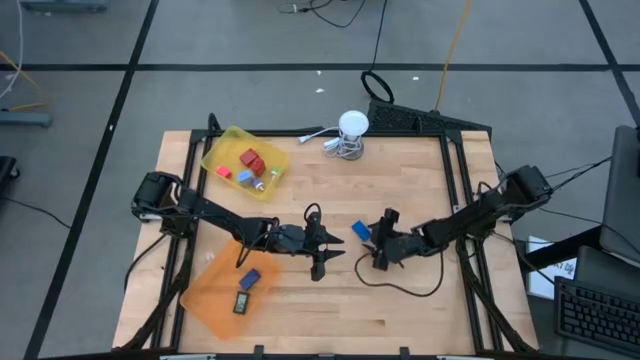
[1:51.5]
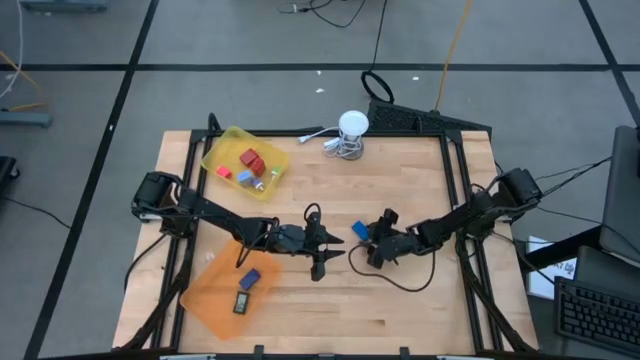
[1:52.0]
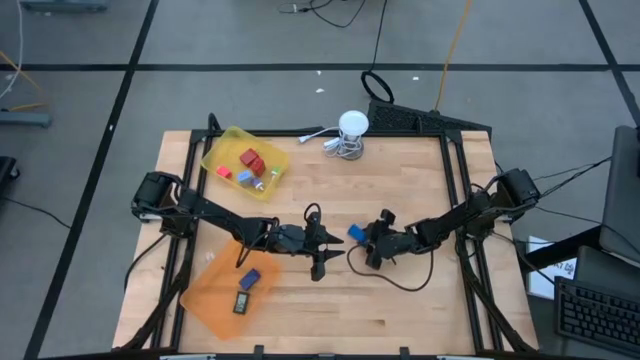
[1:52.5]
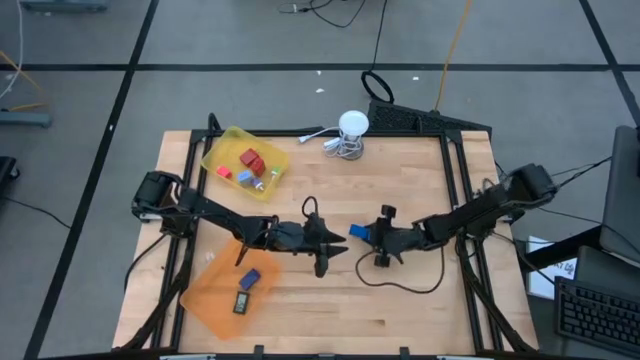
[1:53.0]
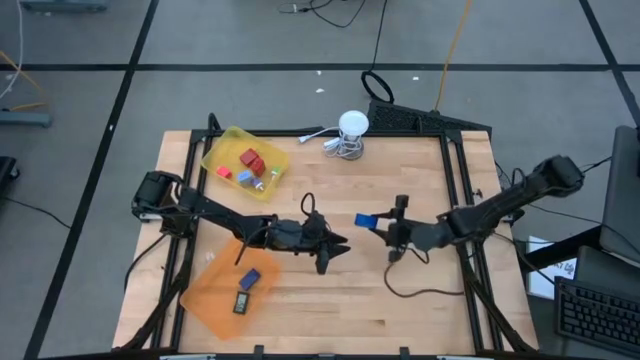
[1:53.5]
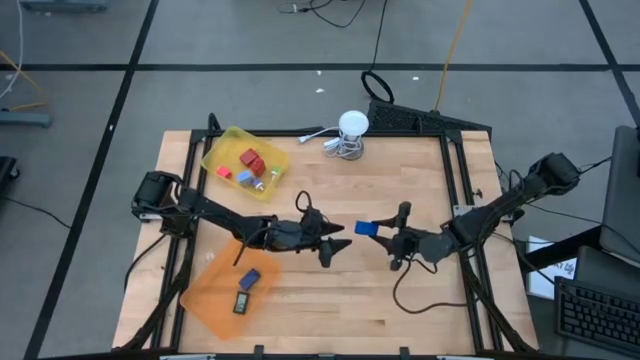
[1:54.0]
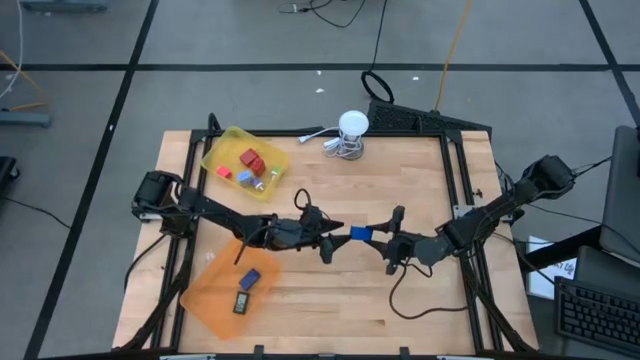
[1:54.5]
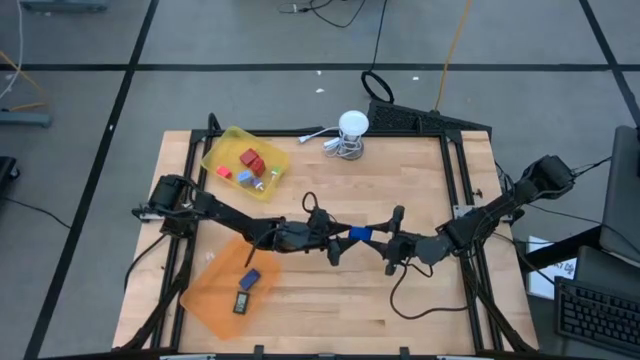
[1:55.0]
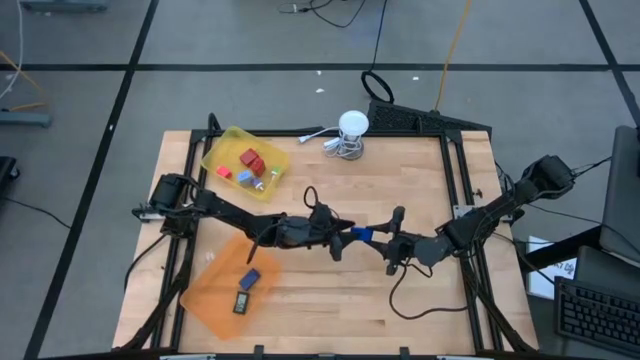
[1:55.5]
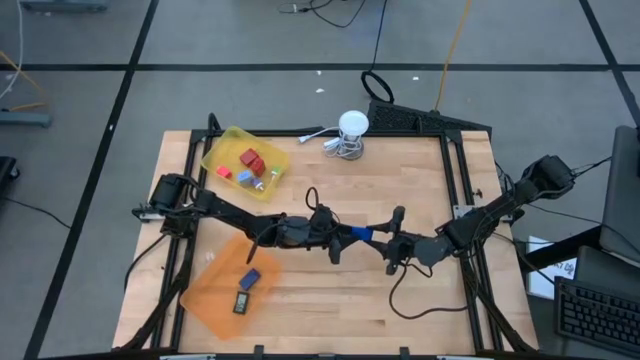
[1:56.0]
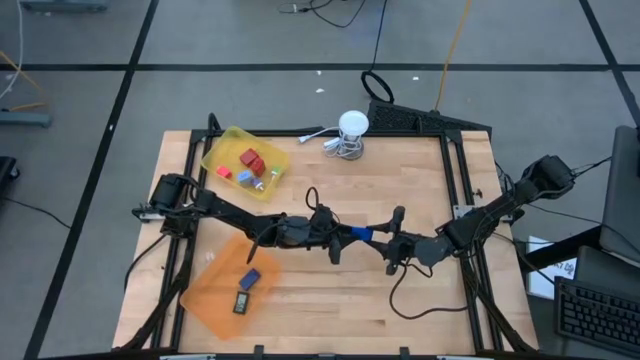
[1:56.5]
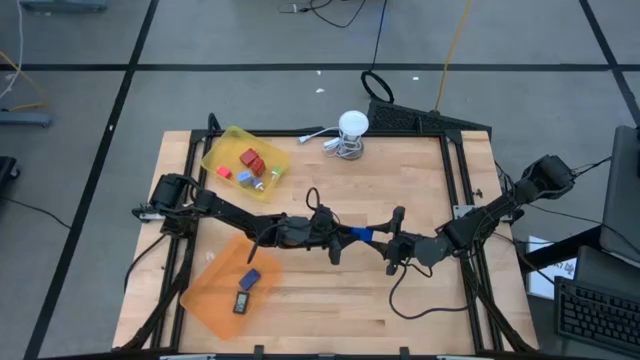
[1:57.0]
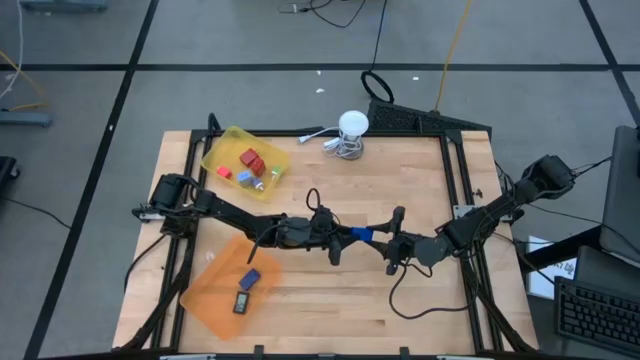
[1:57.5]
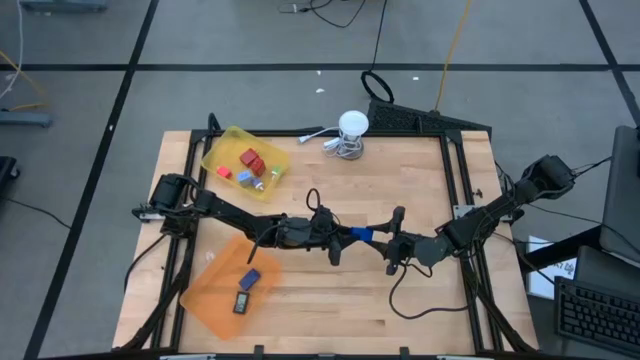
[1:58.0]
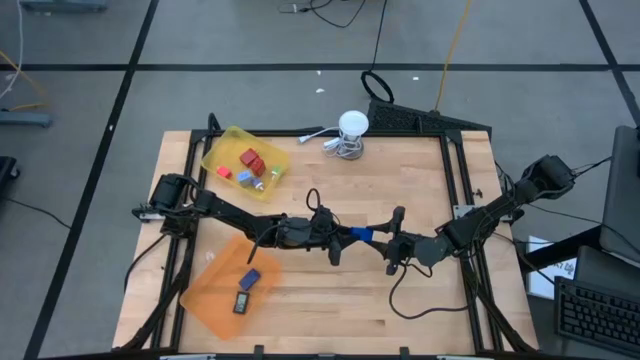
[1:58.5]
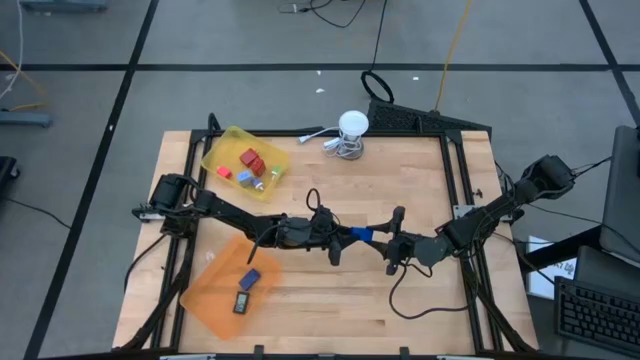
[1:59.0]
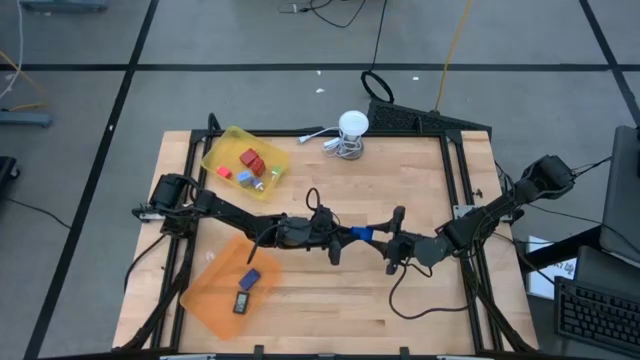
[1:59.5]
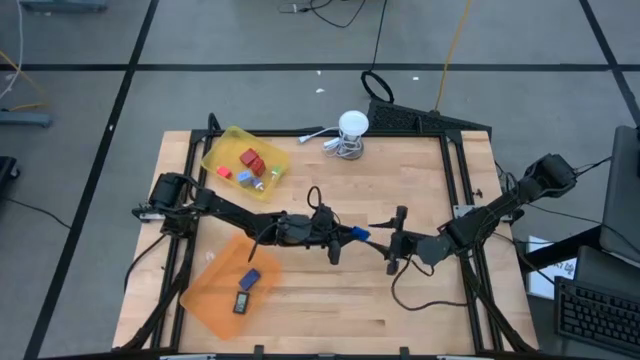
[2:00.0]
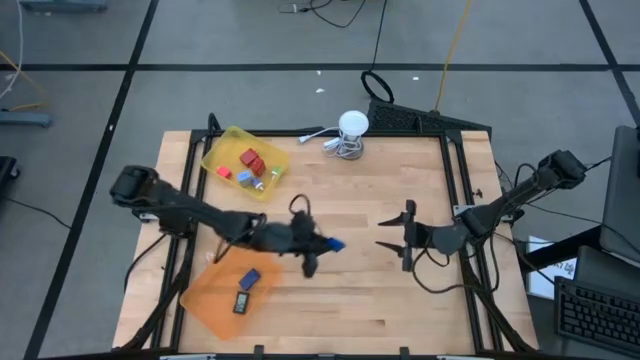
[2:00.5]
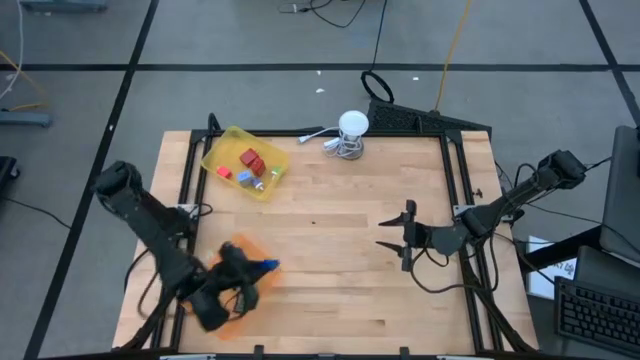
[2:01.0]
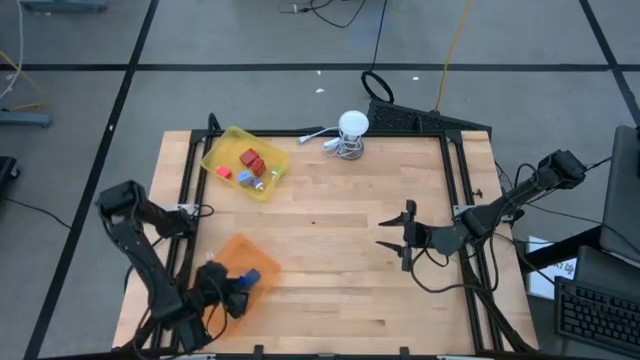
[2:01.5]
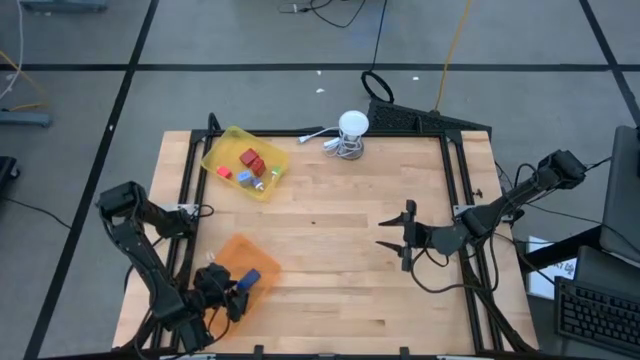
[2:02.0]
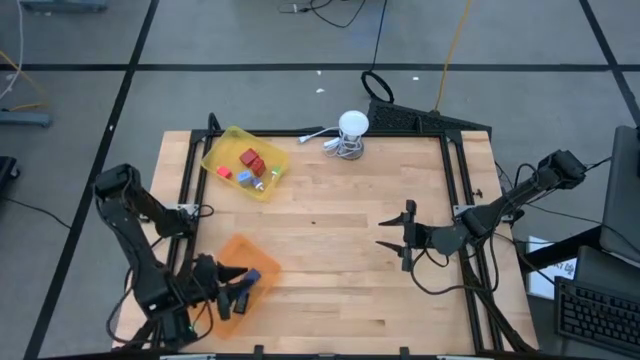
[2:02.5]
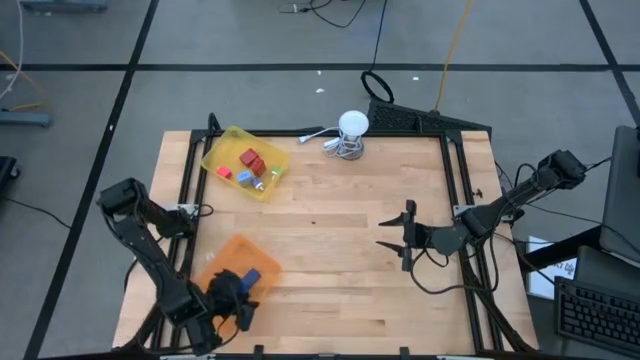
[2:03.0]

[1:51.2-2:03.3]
Task: Pick & Place Office items
Put the blue digital timer into the orange bin

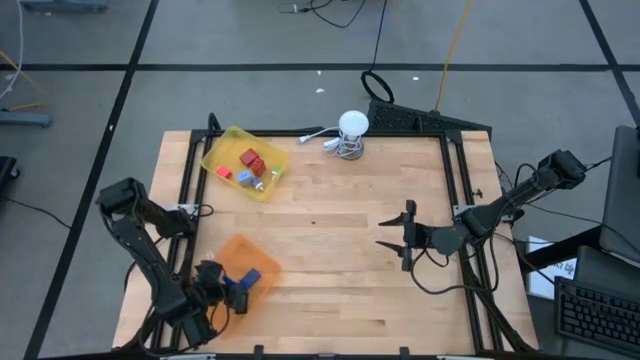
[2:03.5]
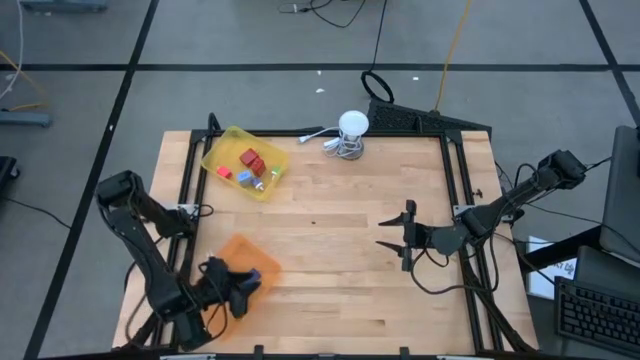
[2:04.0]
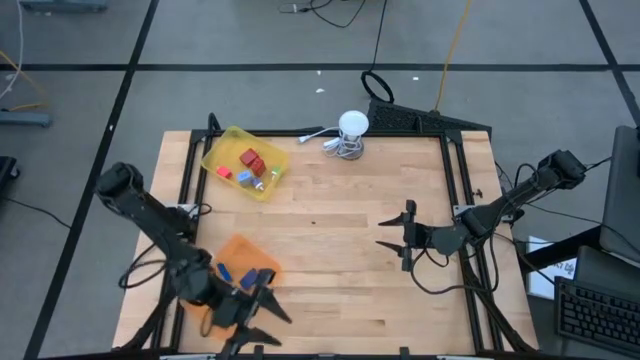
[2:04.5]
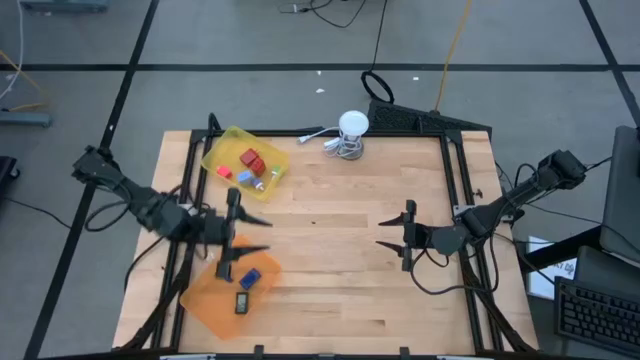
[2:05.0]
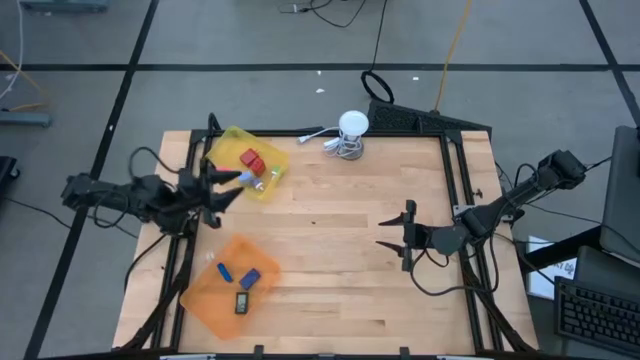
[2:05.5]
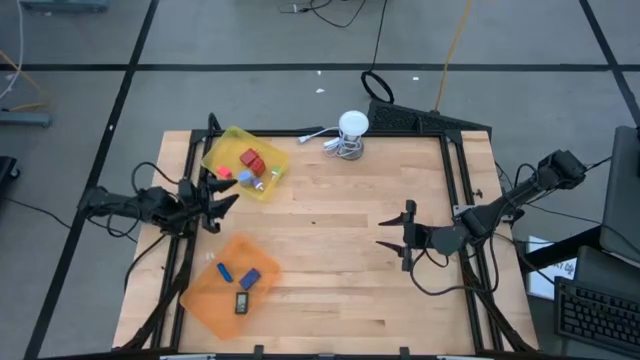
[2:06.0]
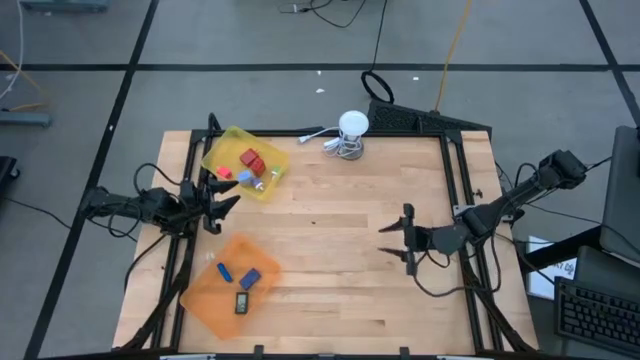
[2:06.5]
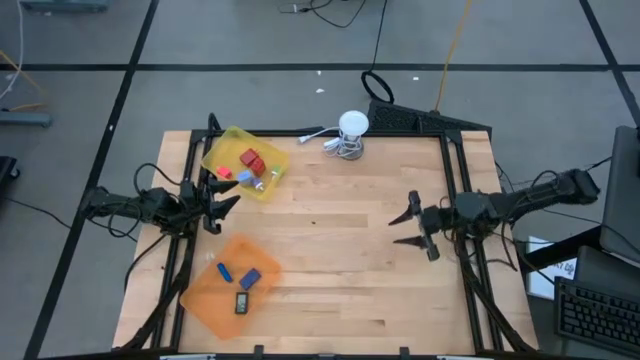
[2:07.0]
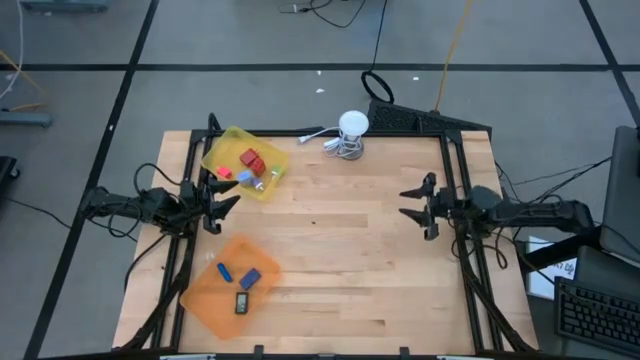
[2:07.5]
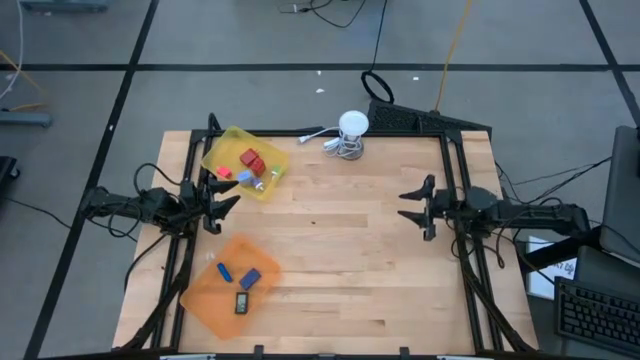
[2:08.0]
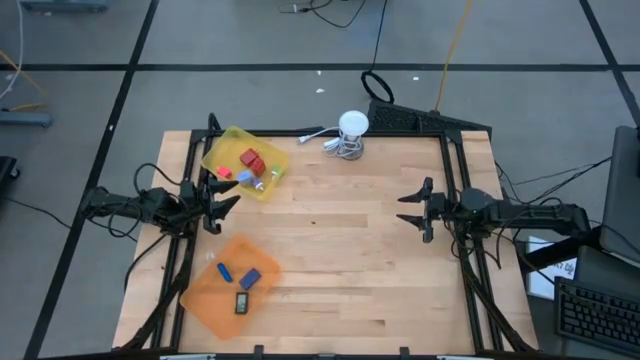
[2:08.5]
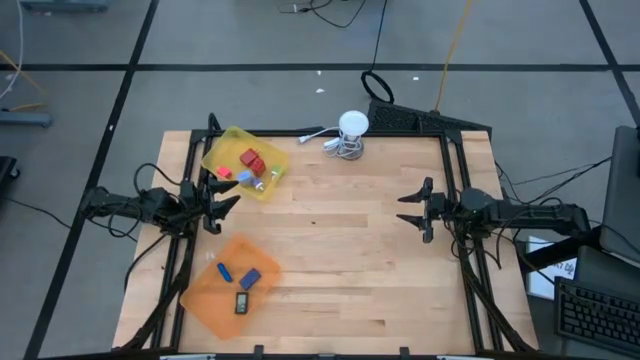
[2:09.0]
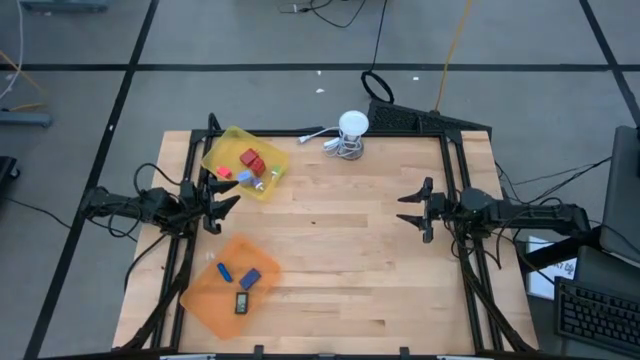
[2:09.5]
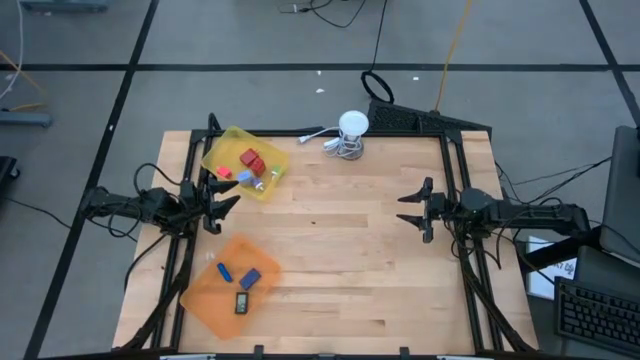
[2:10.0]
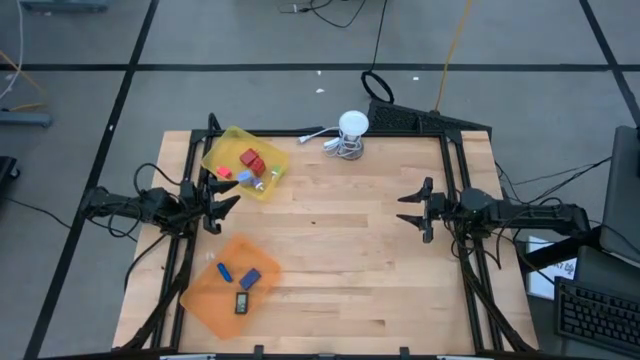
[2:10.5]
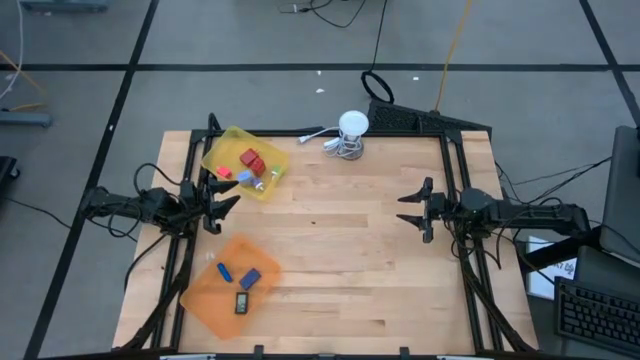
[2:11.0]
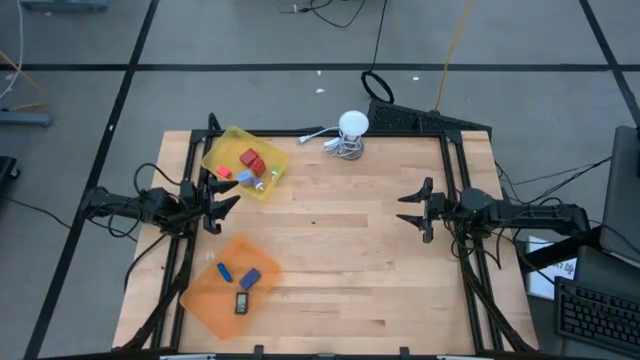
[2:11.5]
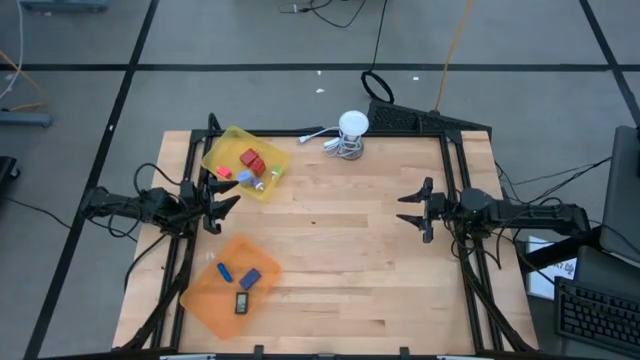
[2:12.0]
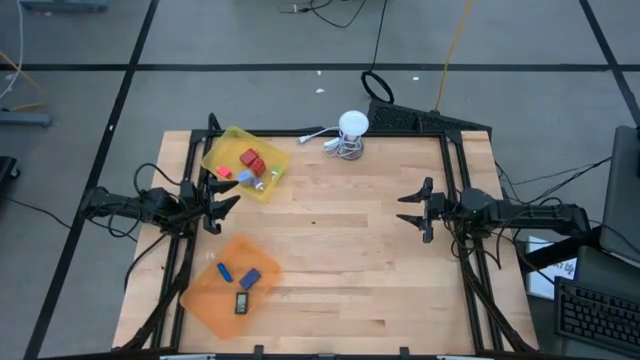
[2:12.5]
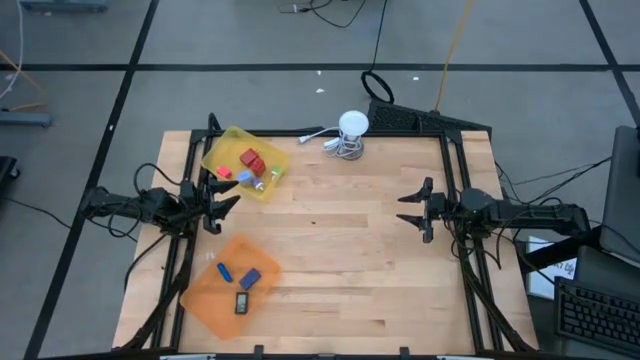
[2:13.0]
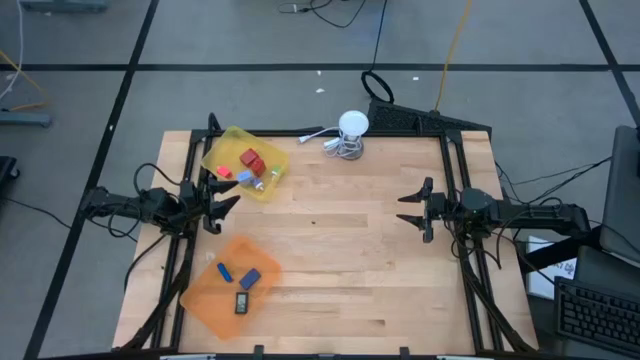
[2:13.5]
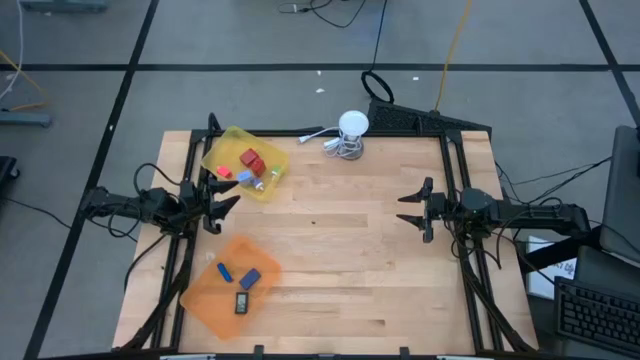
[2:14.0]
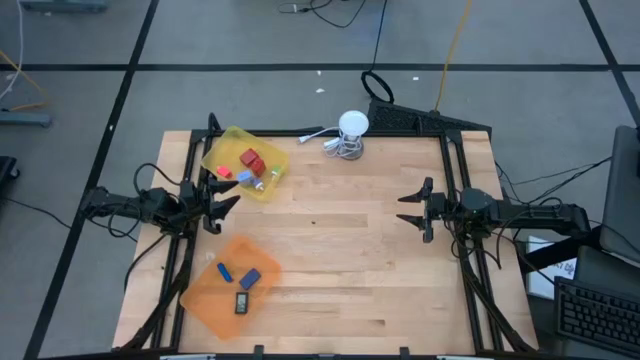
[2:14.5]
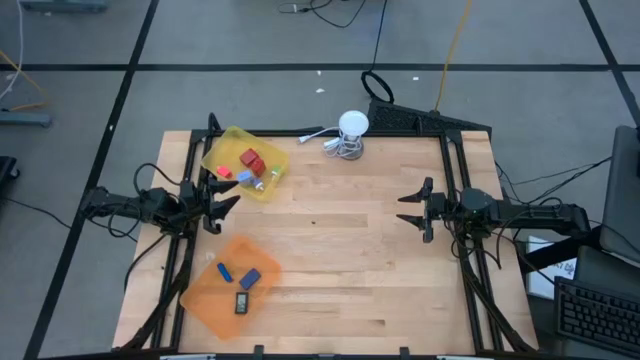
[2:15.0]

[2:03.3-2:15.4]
Return to Home Position
